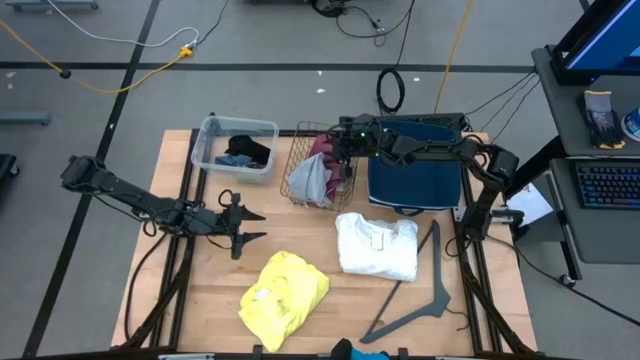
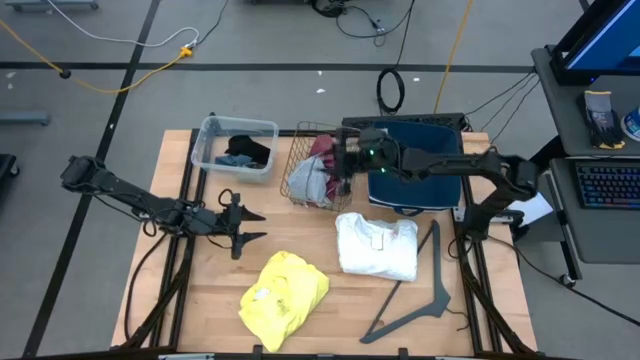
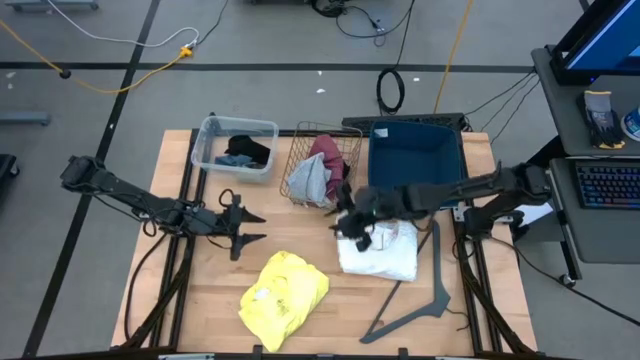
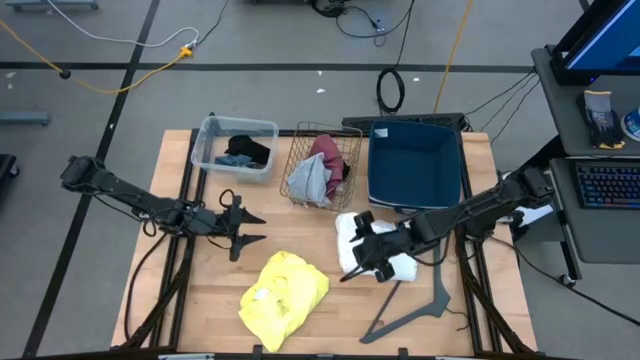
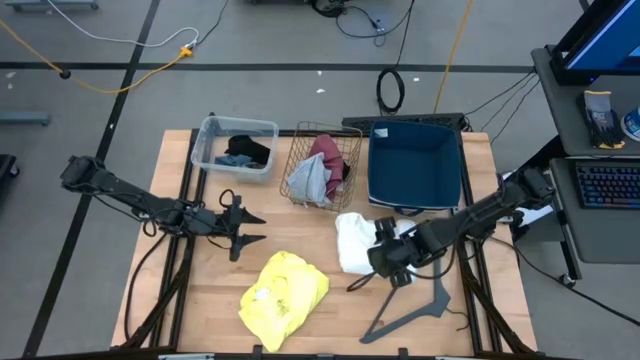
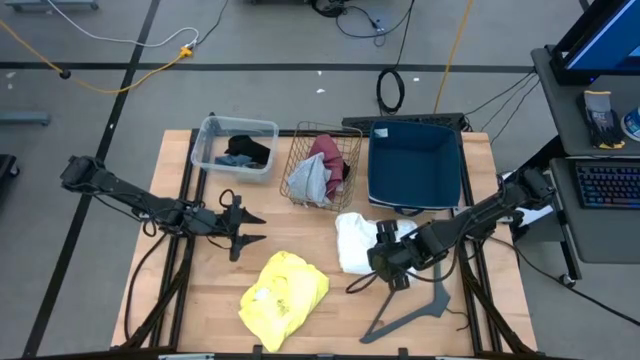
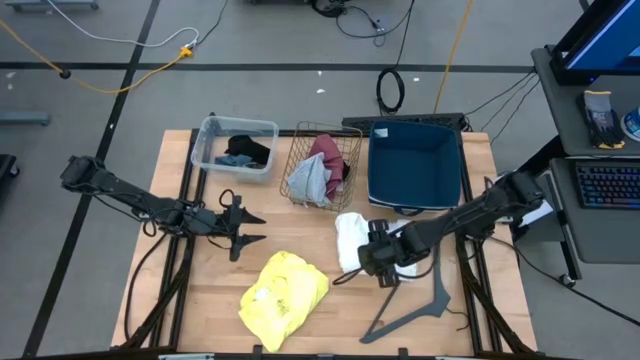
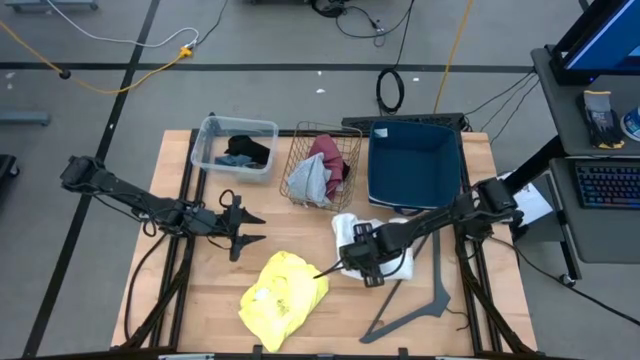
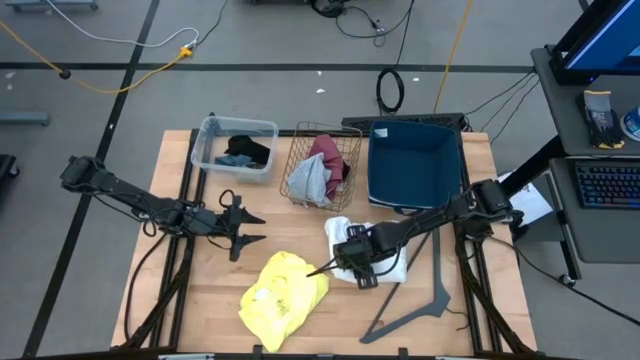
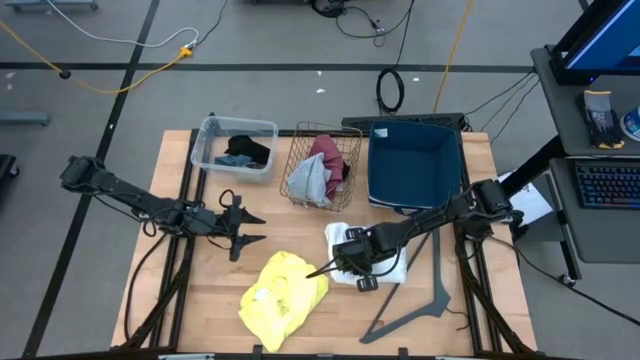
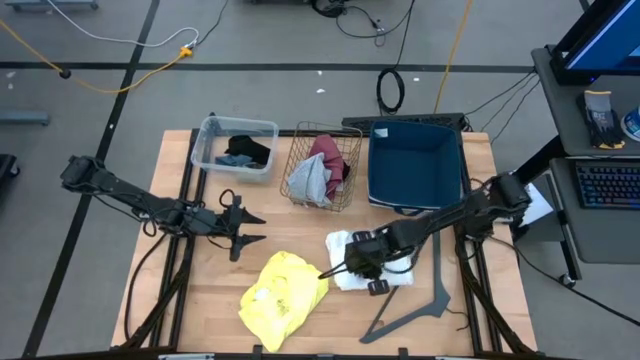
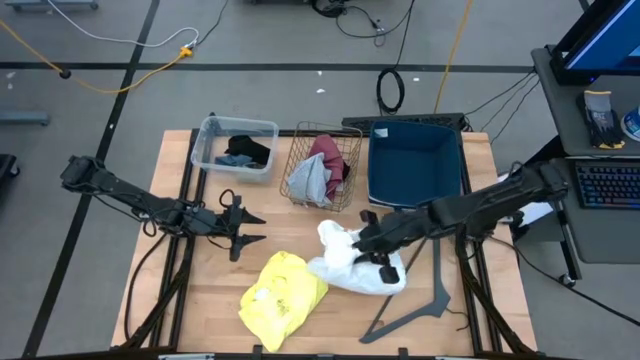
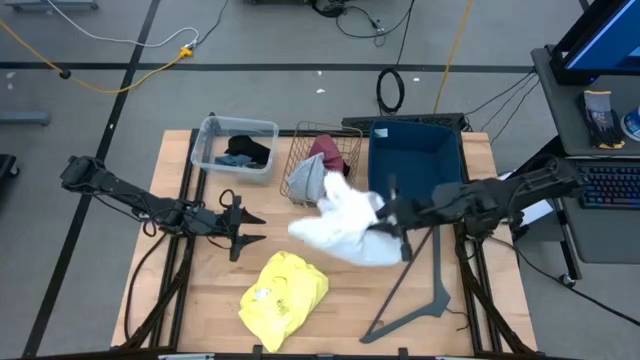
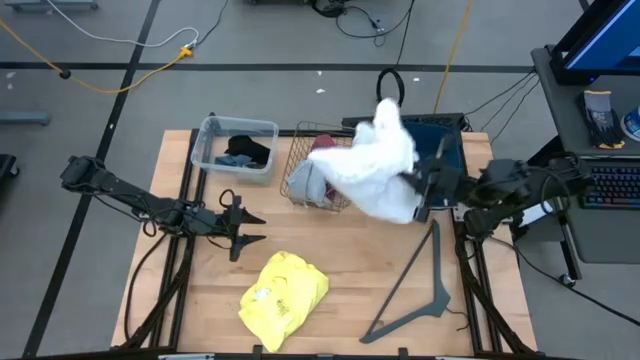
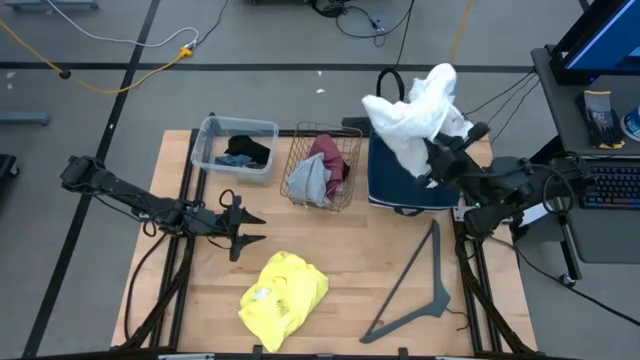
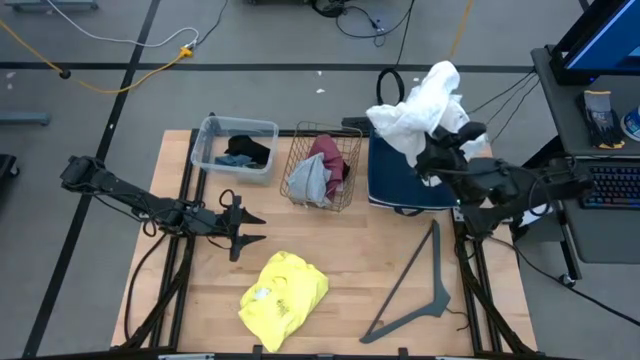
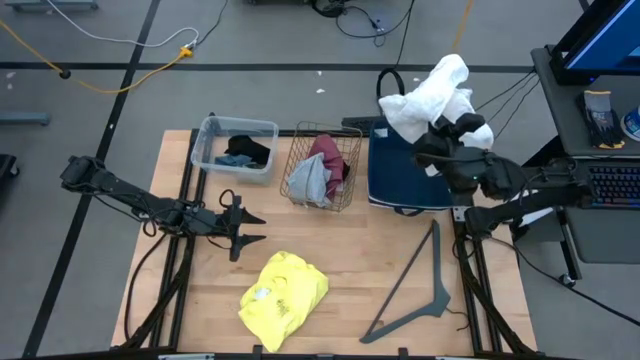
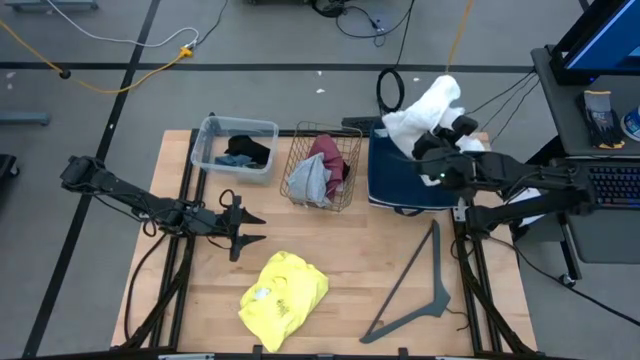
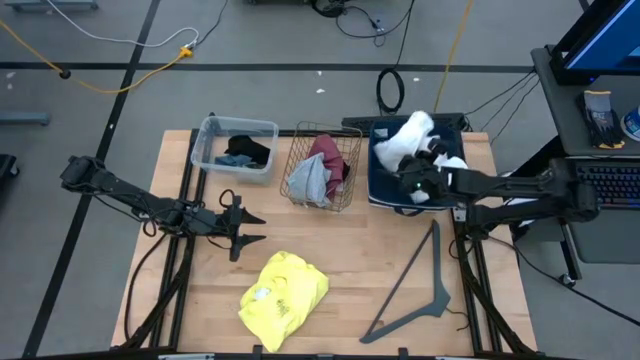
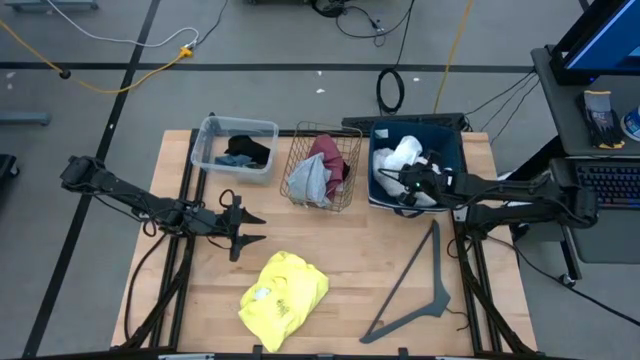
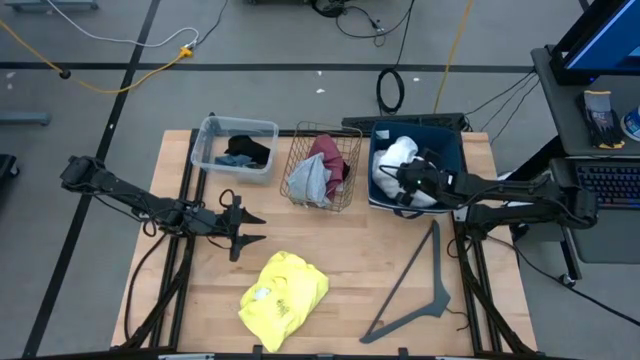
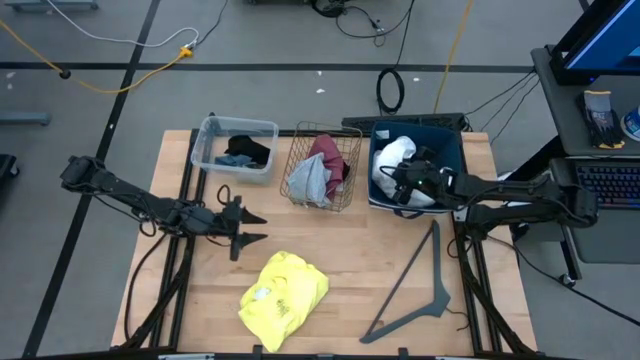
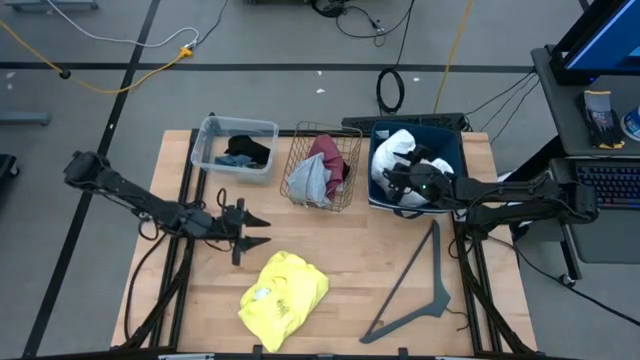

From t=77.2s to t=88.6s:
Task: Pick & Place Cloths
Put the white shirt into the blue laundry organizer

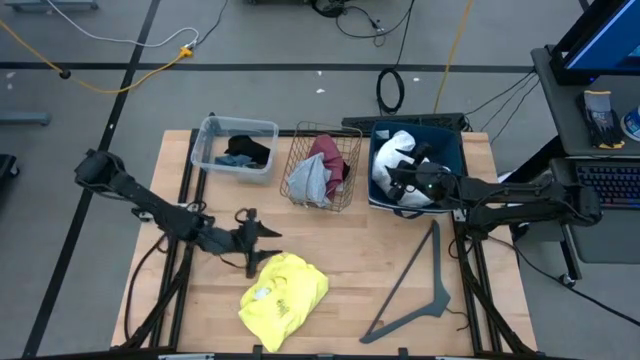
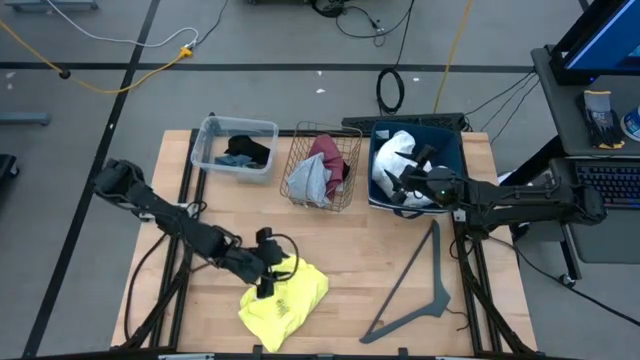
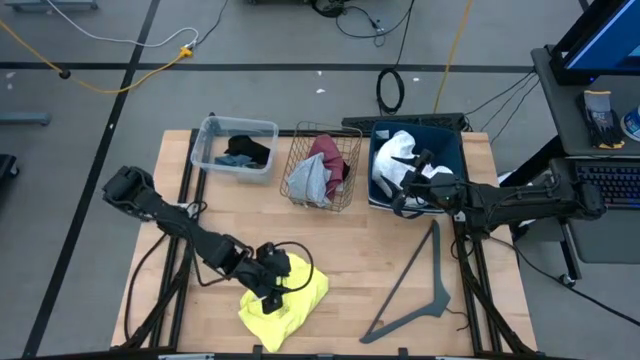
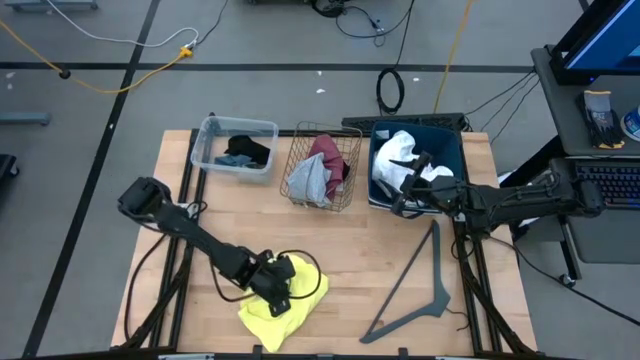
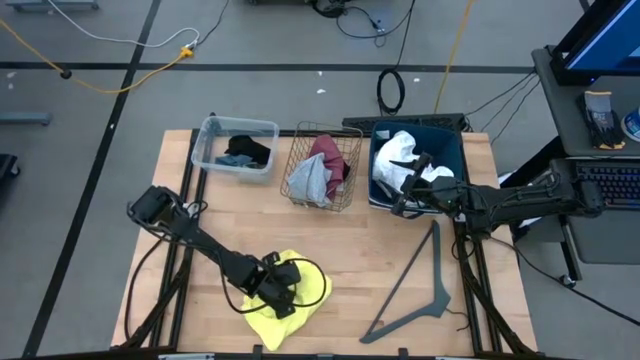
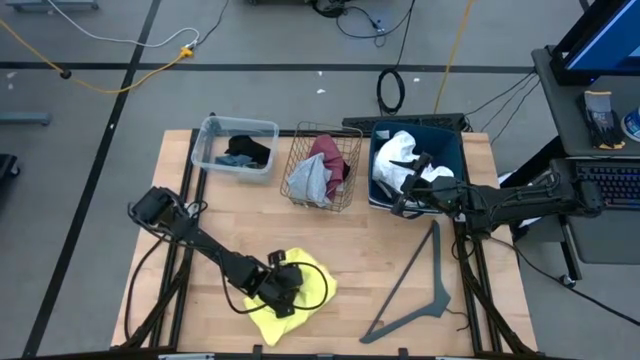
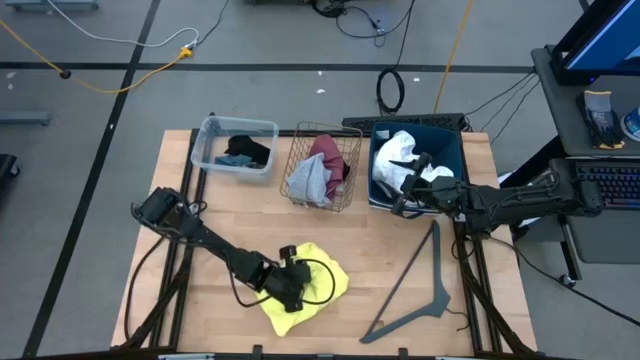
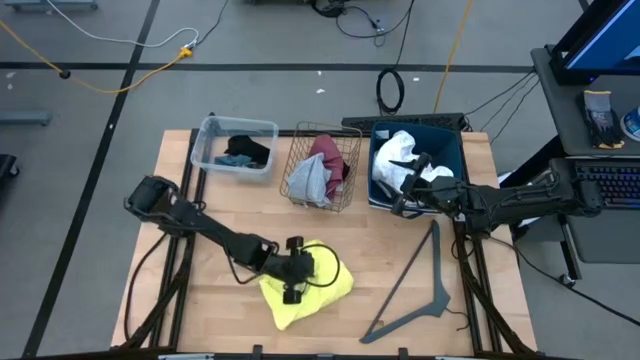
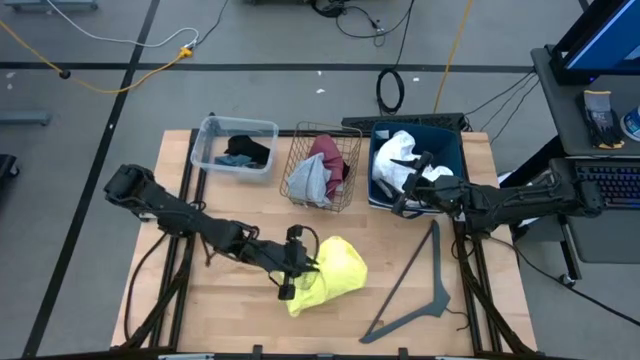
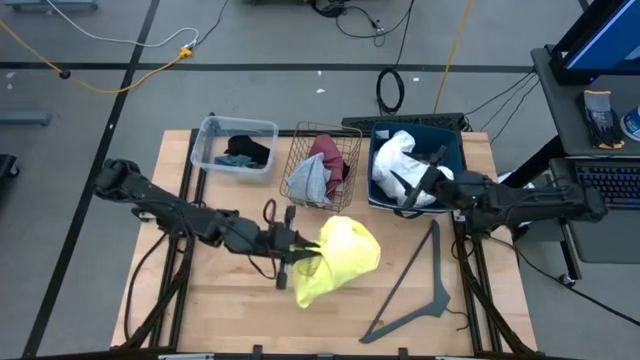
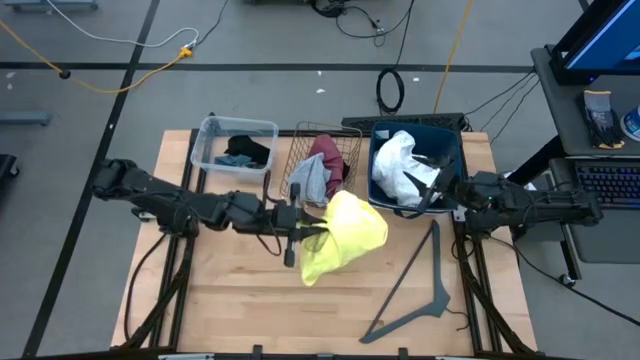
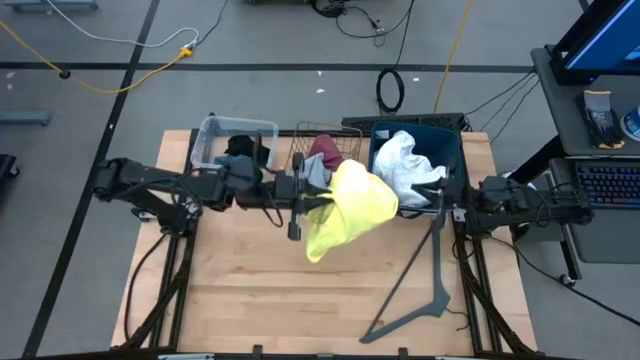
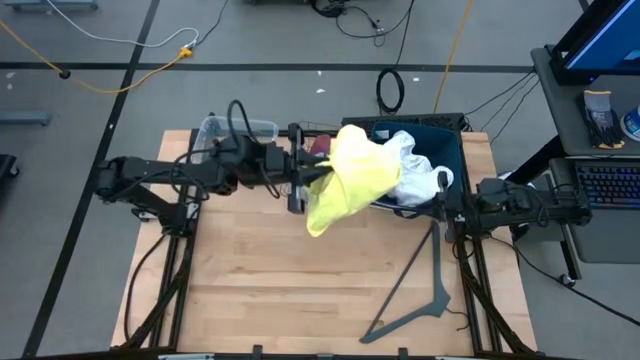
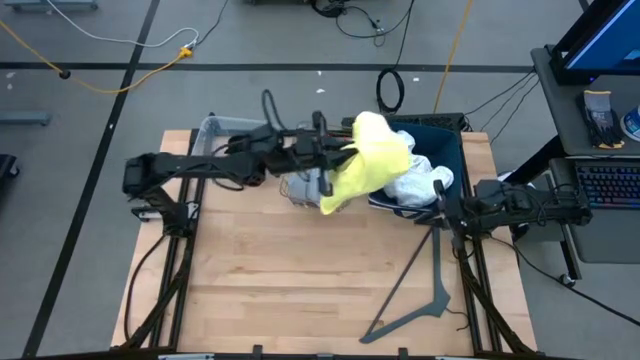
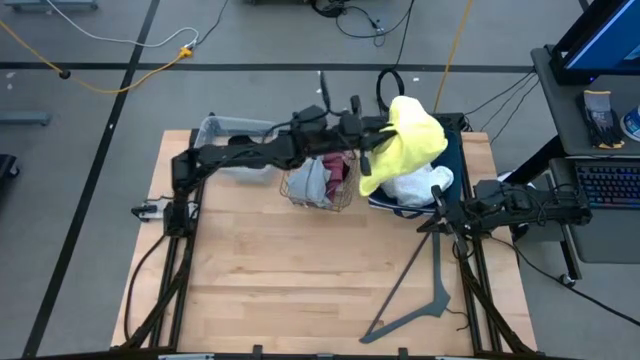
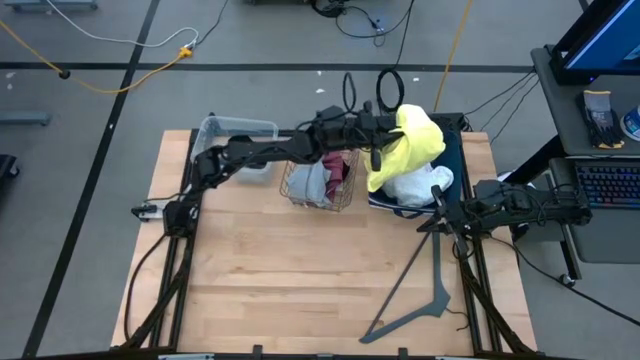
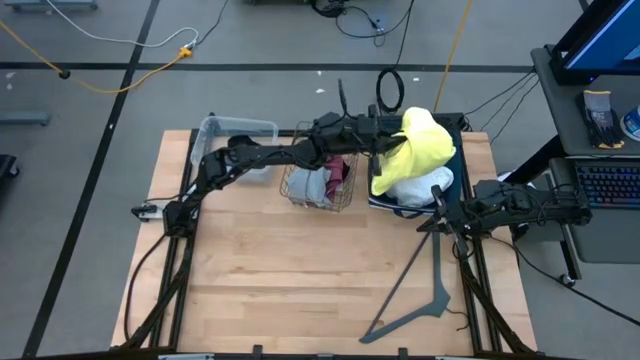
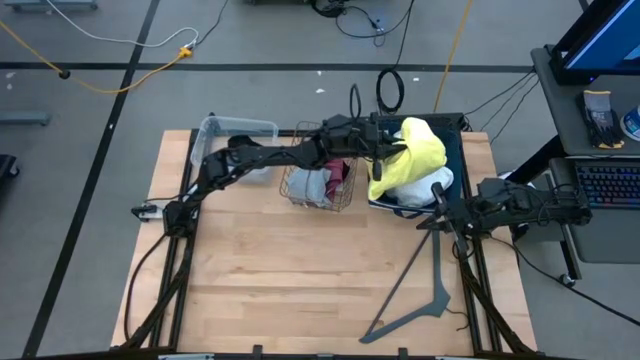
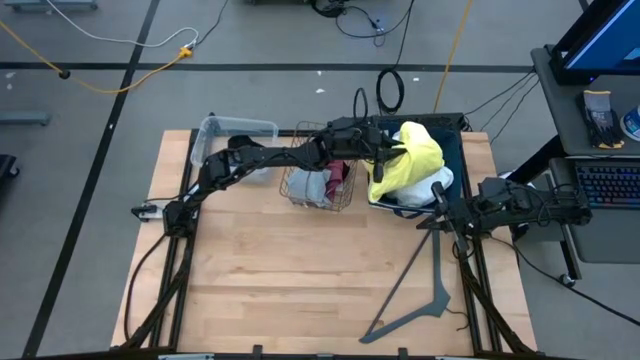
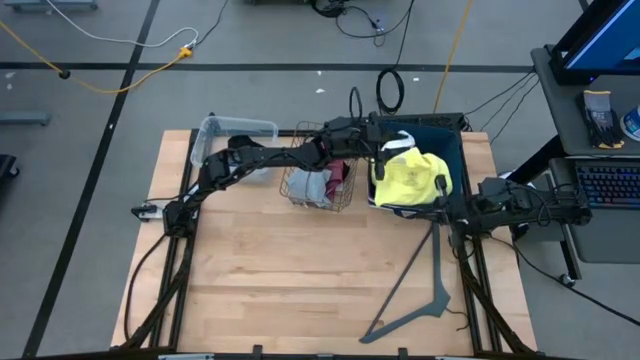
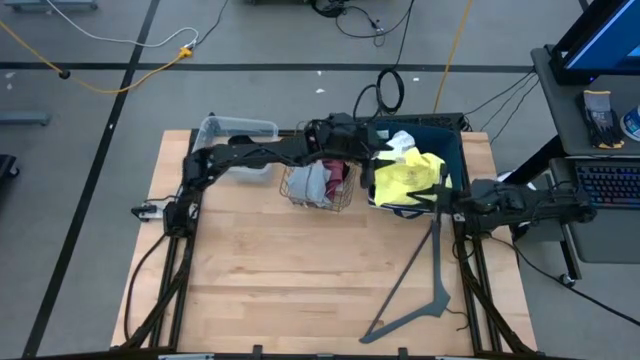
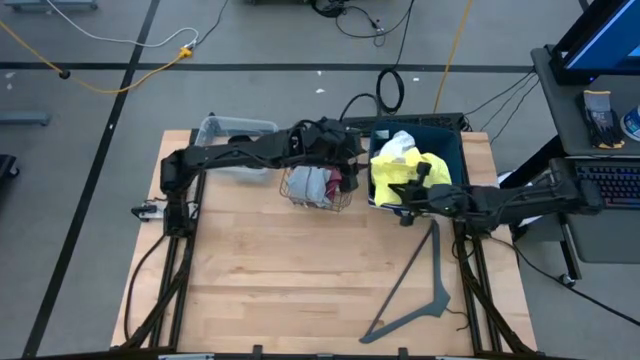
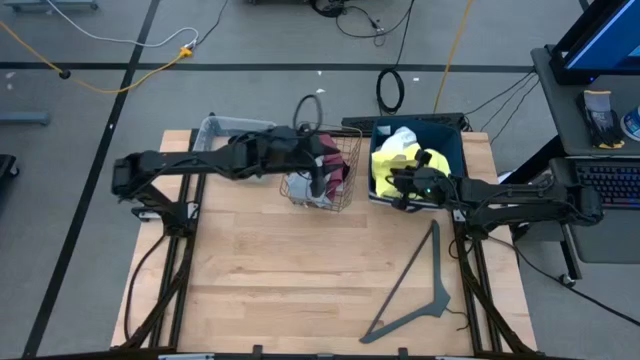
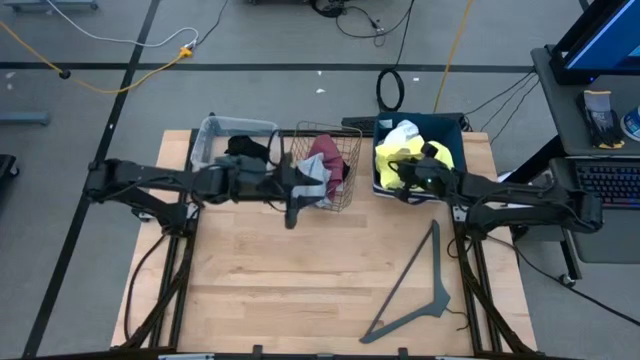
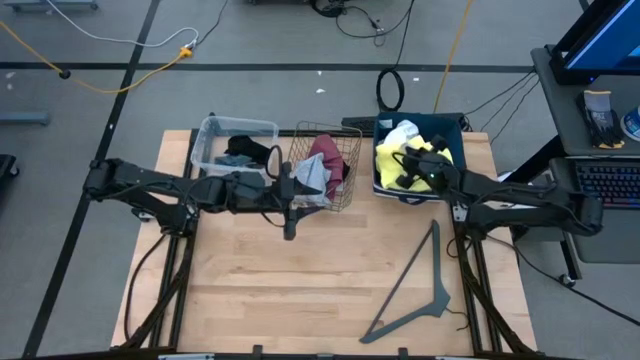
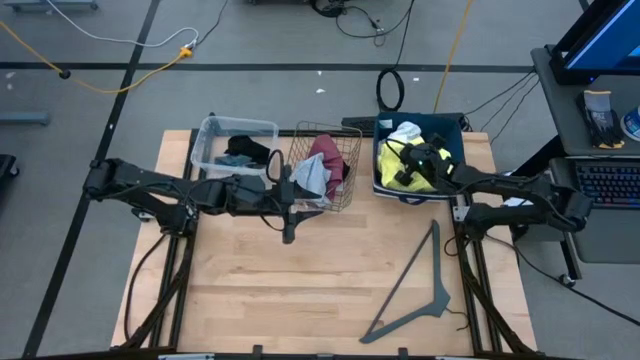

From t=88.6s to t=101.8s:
Put the yellow shirt into the blue laundry organizer
